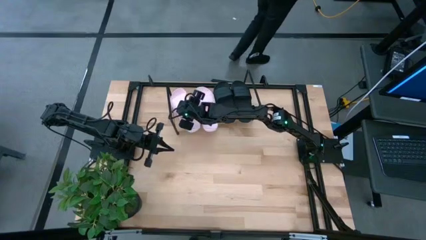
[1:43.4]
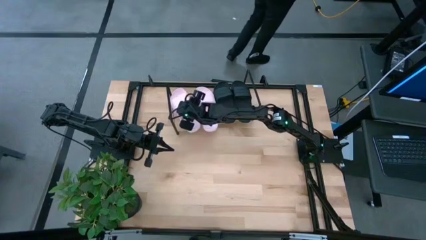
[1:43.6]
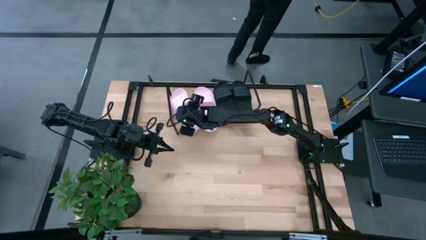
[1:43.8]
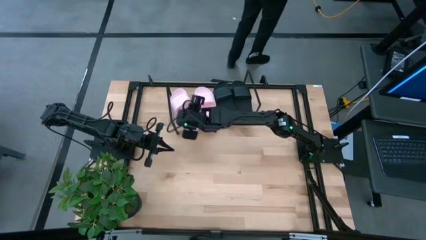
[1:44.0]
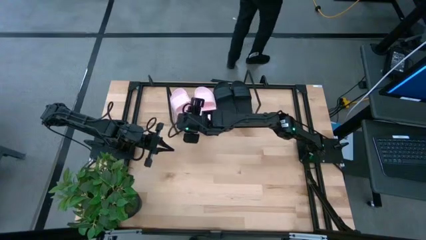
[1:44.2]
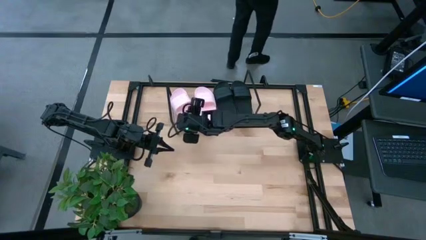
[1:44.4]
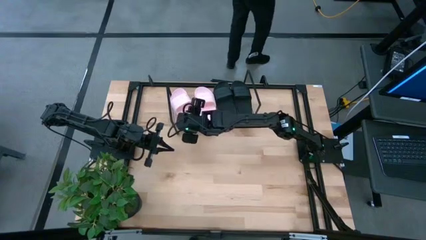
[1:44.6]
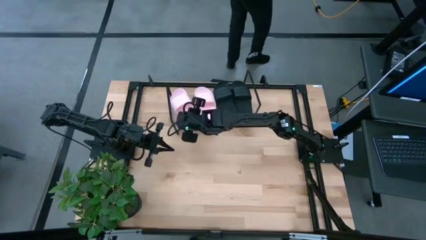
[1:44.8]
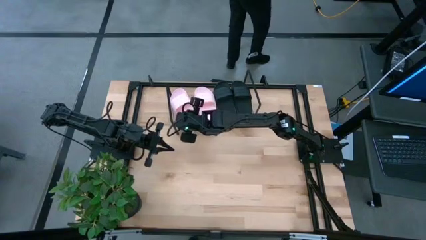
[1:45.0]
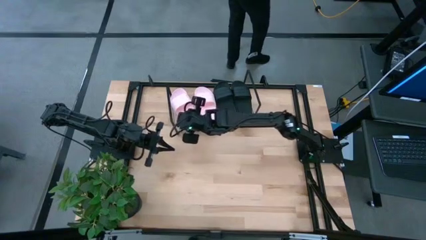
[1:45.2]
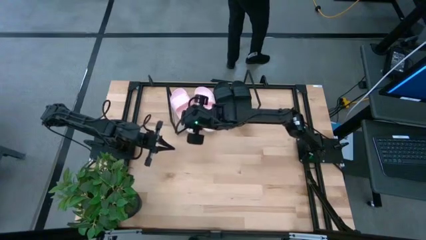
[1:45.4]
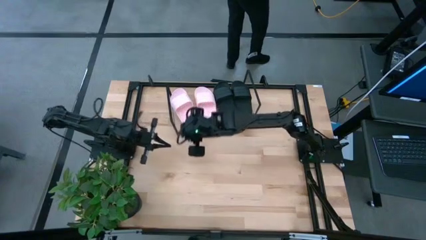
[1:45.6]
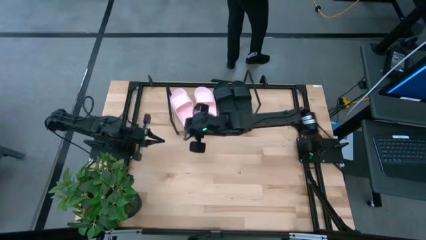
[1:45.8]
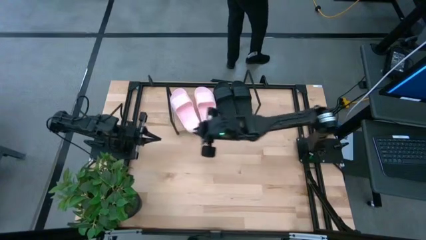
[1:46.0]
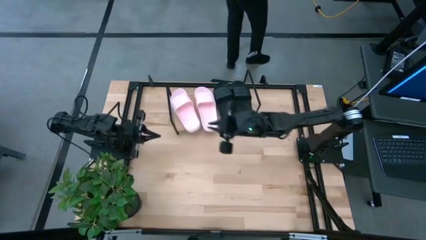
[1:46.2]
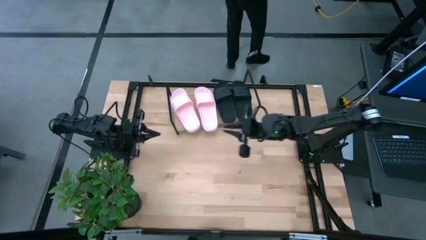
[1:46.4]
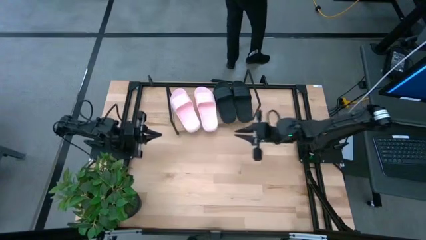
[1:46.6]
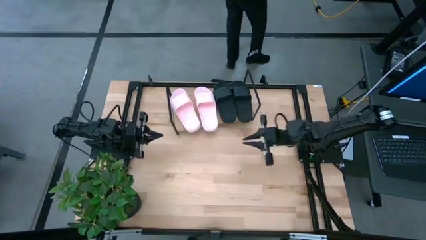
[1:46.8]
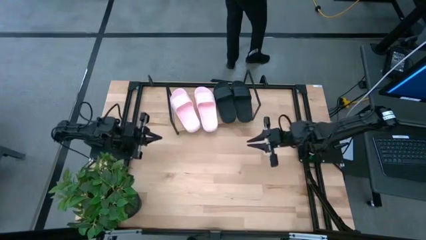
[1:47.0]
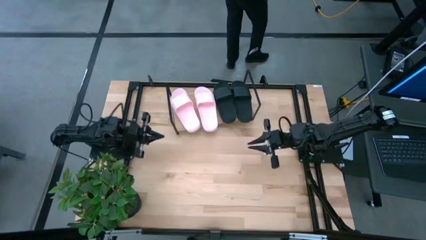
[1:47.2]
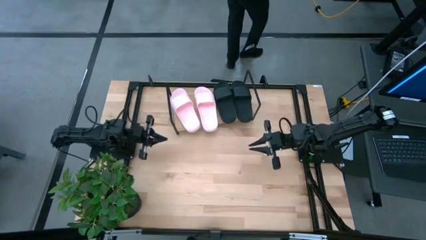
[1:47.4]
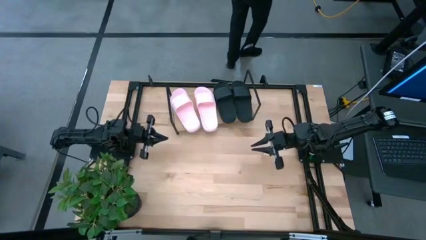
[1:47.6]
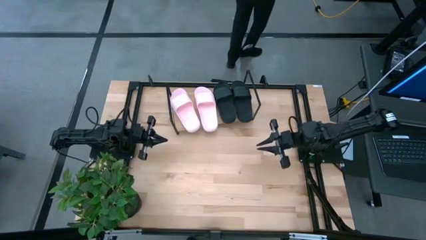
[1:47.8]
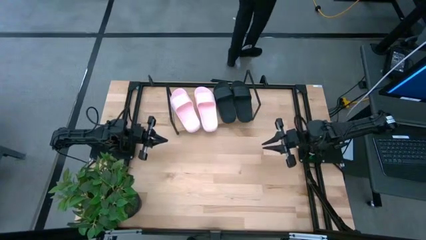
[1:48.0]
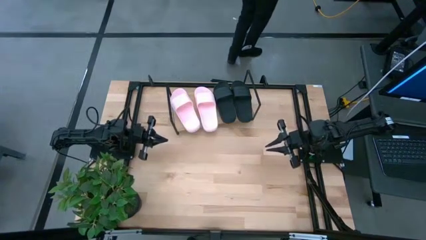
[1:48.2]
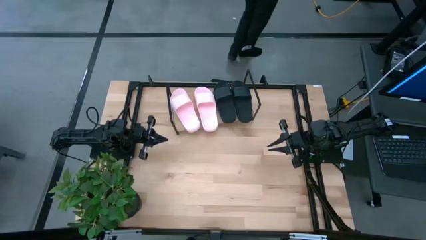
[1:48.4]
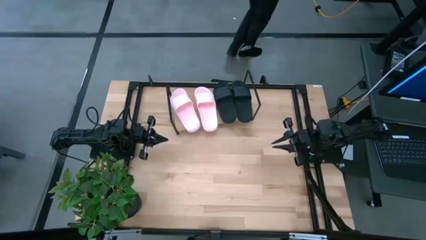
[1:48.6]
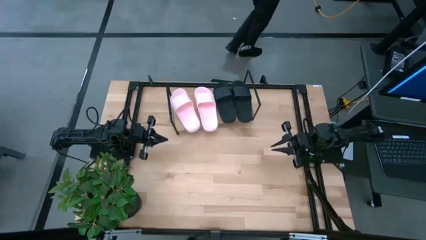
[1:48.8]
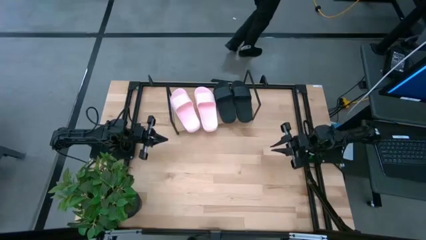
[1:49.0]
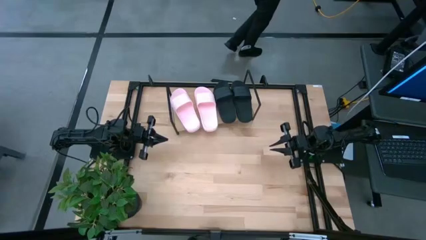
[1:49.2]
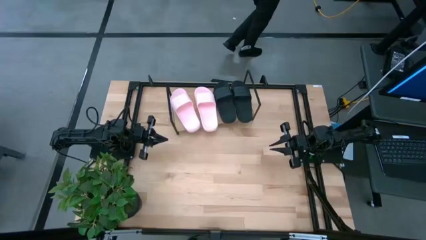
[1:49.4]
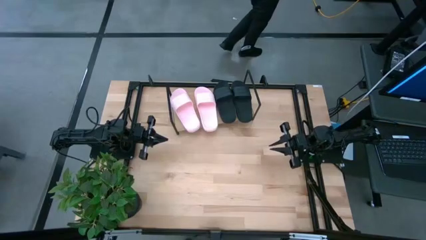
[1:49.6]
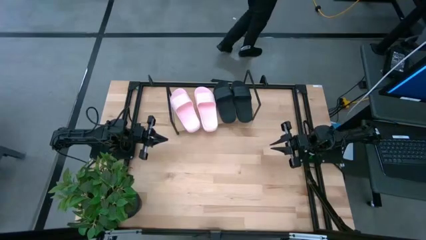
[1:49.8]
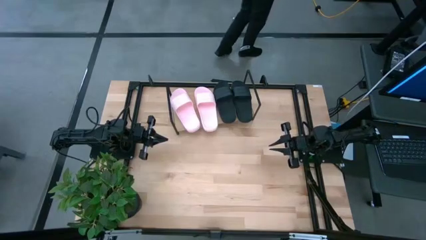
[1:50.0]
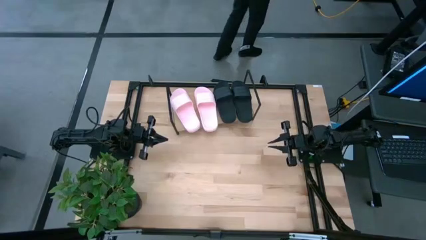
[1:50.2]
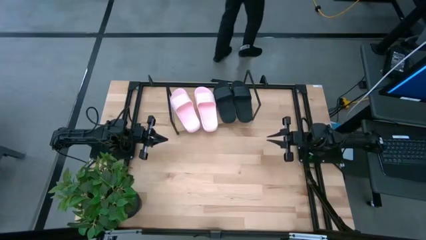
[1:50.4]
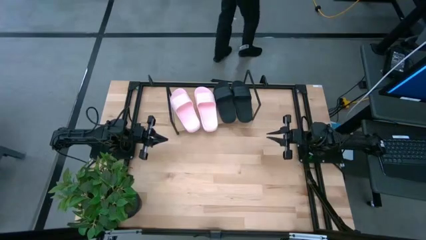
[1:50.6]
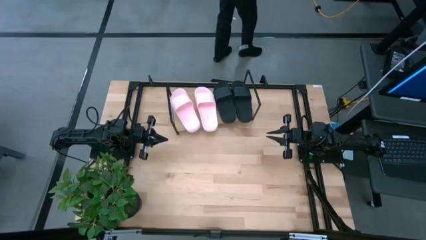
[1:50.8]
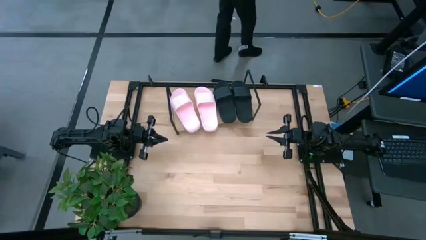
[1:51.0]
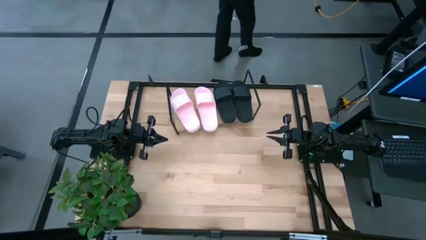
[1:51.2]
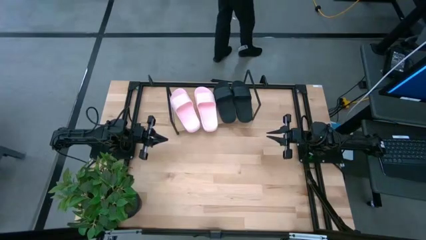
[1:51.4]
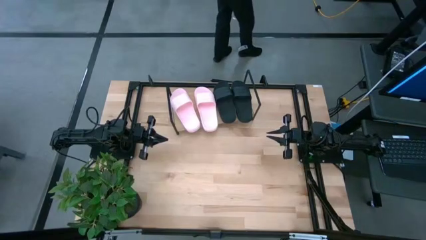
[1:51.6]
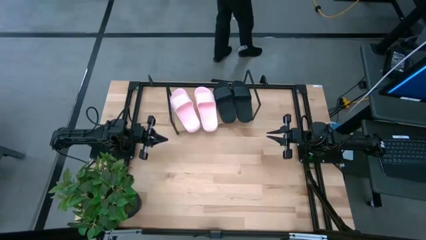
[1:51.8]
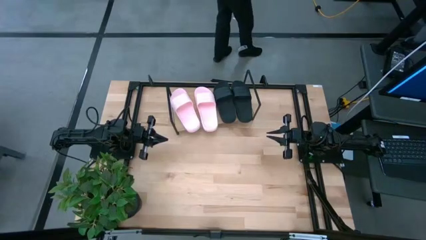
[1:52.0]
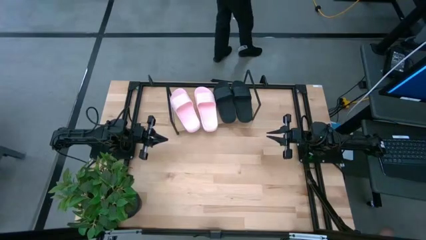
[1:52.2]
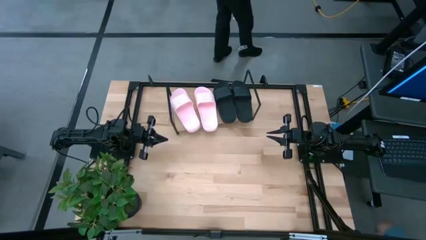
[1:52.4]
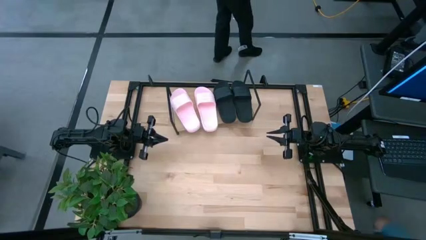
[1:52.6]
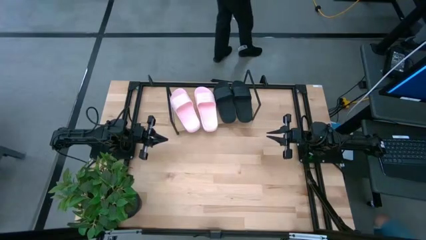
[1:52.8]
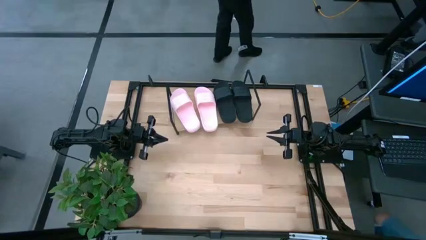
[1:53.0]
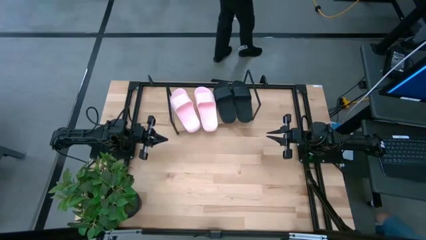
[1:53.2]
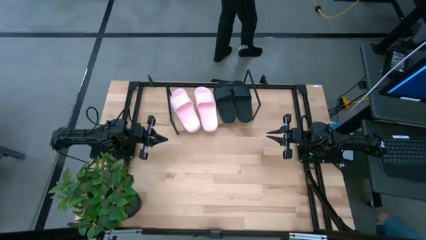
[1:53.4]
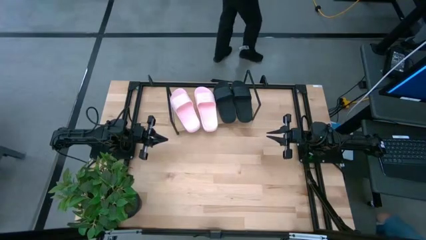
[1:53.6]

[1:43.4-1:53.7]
Task: Pick and place slides into the shelf
Return To Home Position
